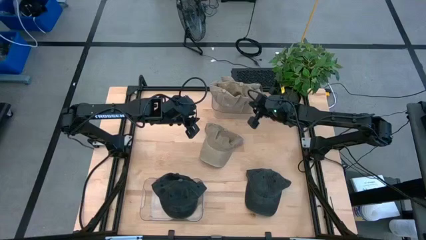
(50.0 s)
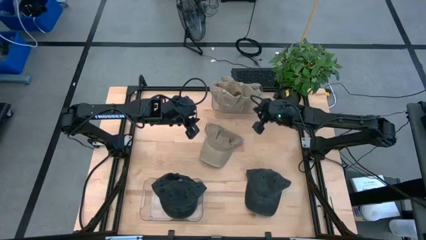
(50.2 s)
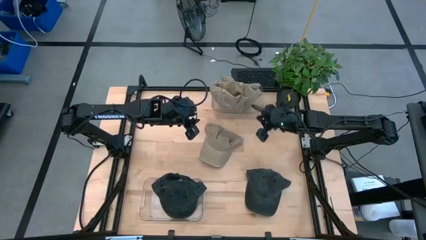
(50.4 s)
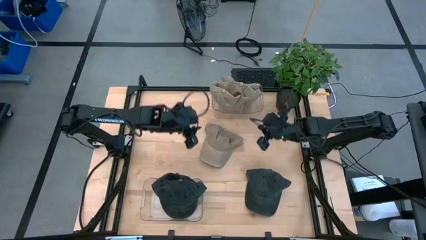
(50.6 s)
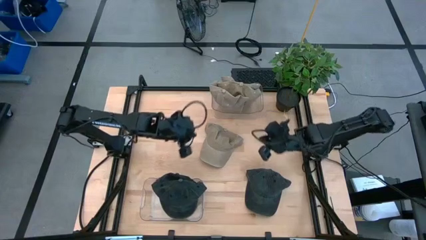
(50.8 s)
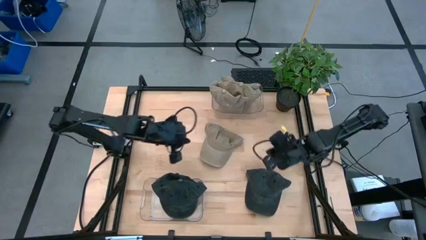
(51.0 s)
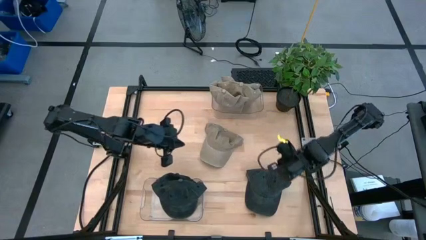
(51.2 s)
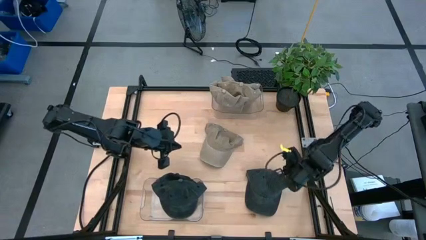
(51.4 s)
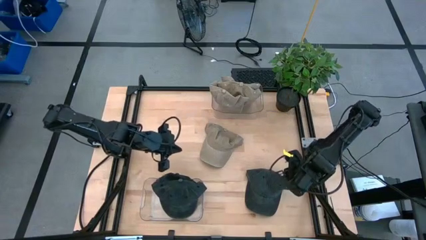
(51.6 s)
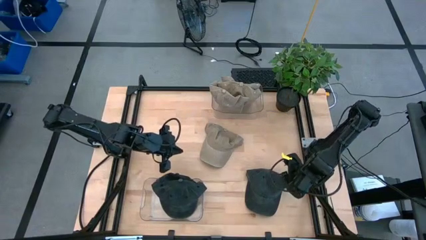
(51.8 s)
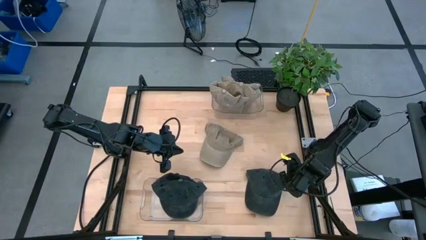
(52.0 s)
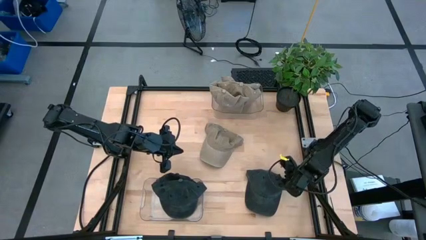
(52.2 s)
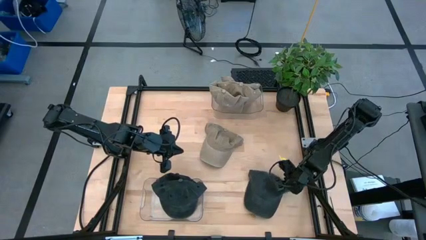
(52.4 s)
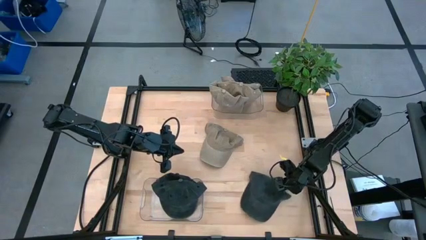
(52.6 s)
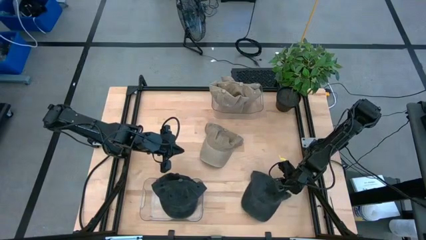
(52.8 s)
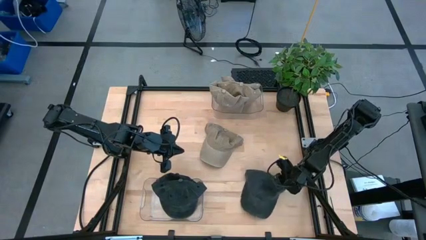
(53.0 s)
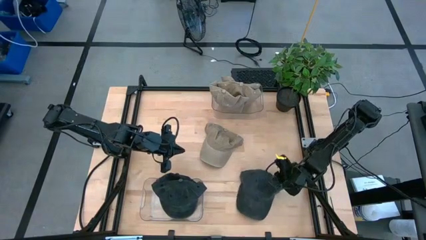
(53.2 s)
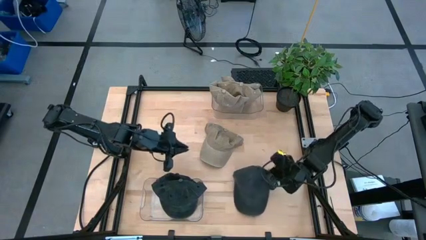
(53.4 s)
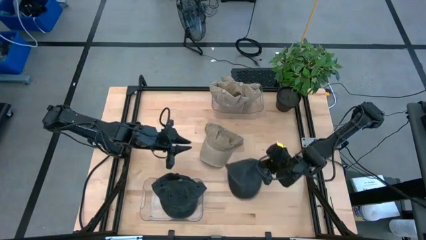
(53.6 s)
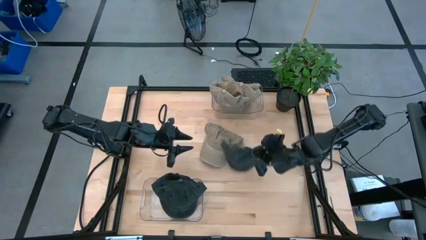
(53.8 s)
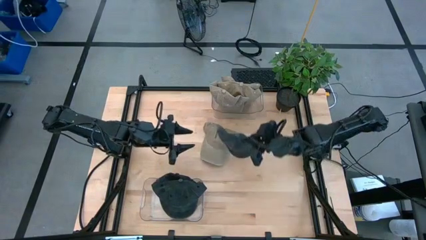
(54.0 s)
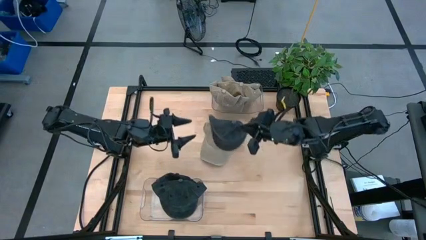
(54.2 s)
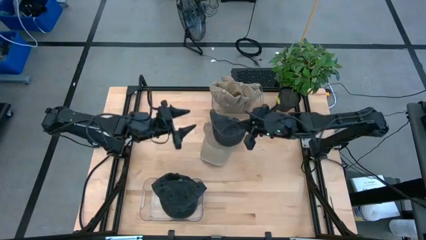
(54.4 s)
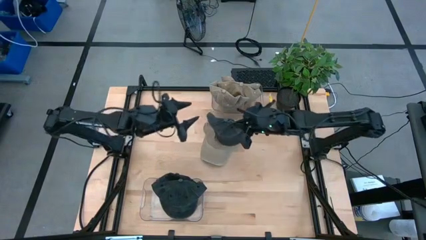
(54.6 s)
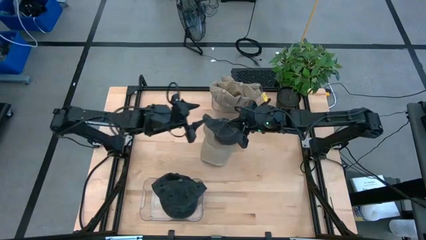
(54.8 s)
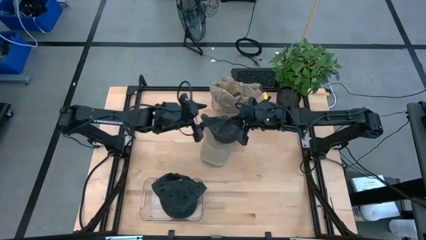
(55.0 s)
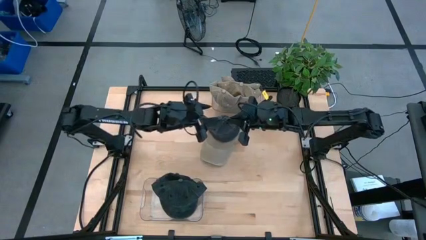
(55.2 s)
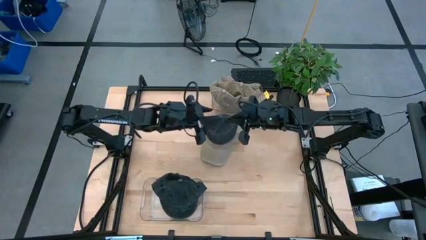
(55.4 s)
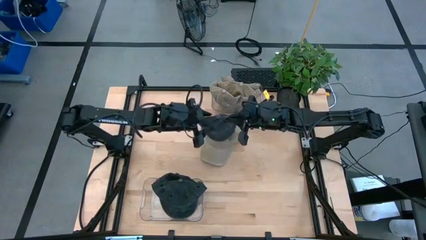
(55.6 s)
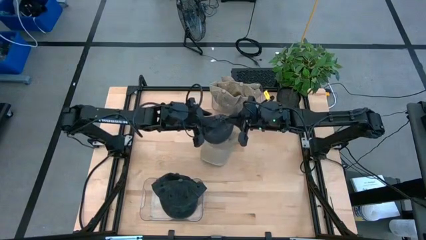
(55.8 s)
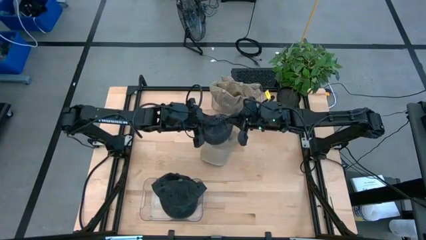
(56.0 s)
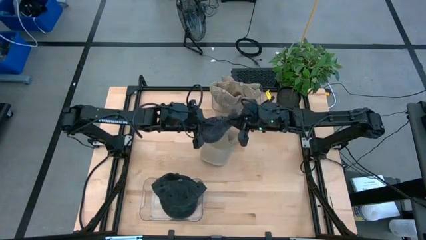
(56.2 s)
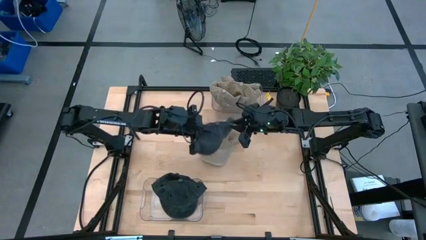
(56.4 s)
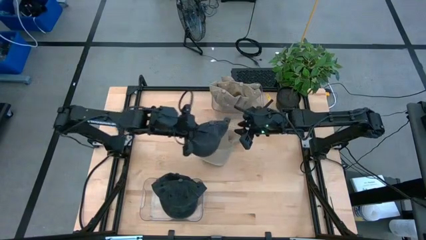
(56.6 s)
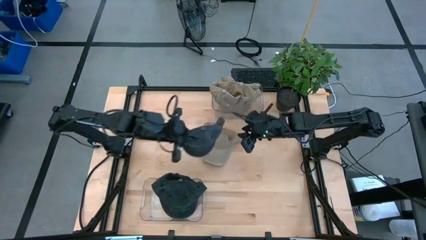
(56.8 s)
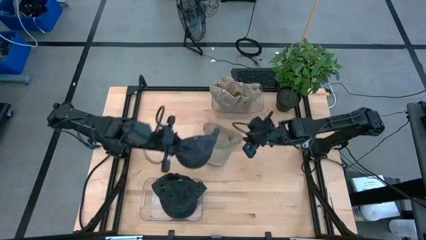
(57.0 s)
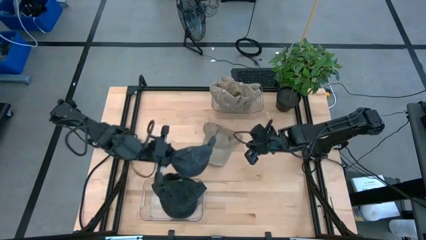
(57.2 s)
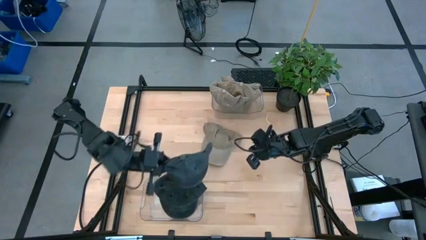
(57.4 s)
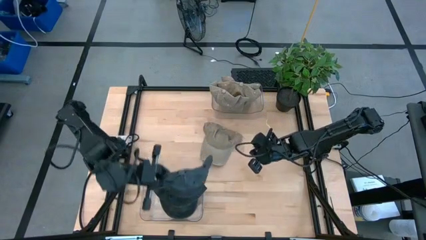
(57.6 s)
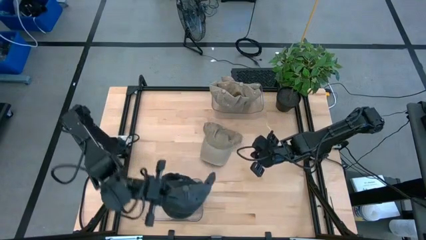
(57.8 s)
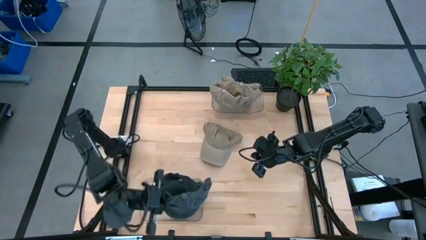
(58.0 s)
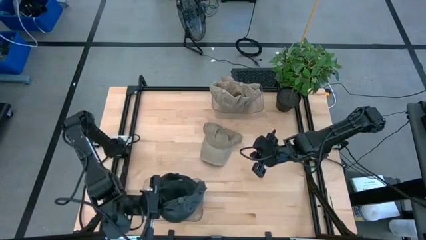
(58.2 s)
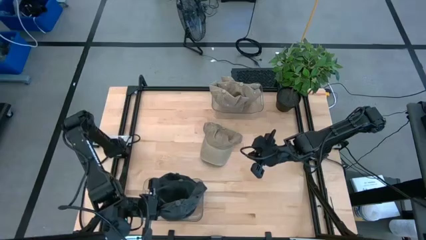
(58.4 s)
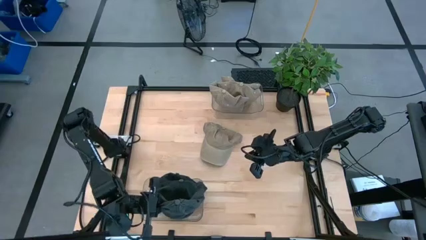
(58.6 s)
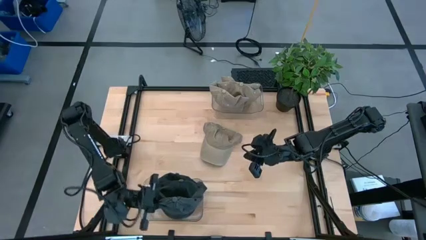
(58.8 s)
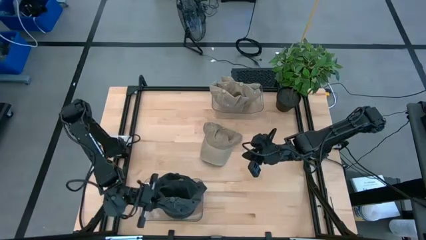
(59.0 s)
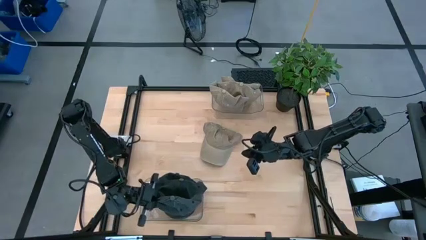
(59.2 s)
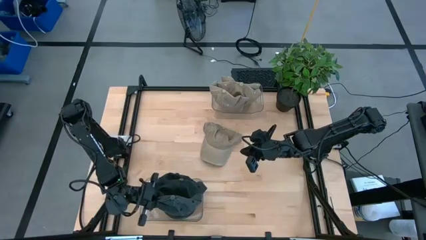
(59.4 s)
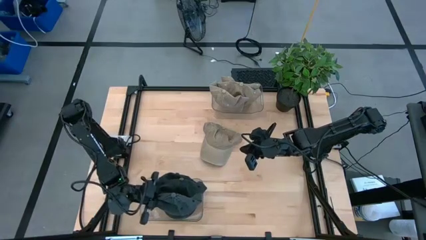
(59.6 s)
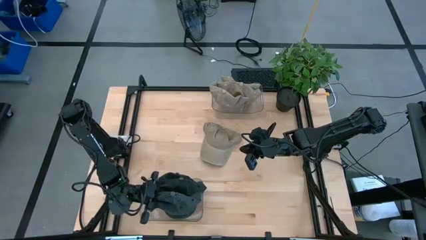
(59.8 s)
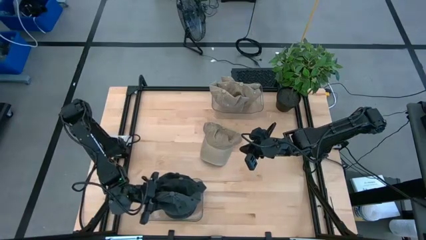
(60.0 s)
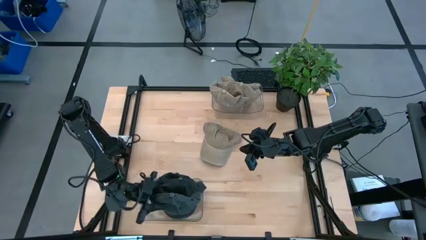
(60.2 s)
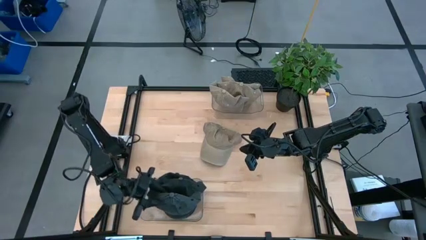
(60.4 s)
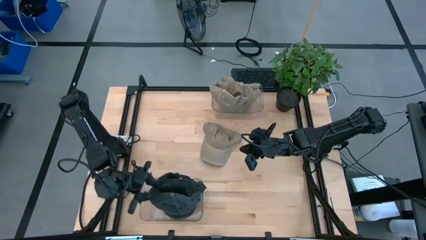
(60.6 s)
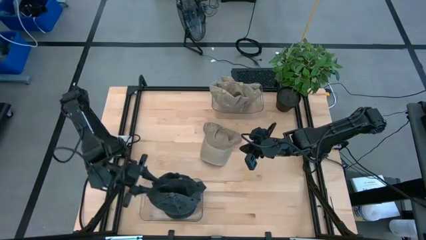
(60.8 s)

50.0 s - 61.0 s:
Task: Pick & Place hat
Put the black cap into the bottom transparent bin

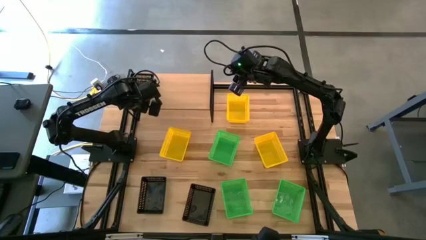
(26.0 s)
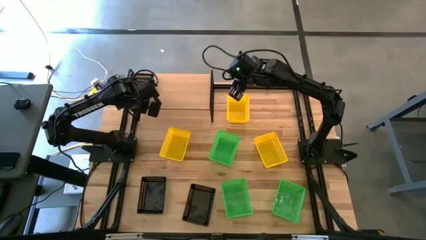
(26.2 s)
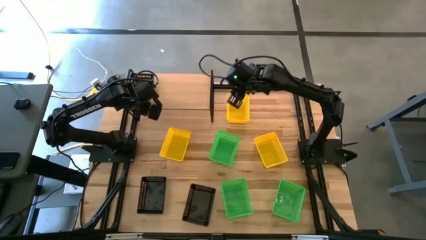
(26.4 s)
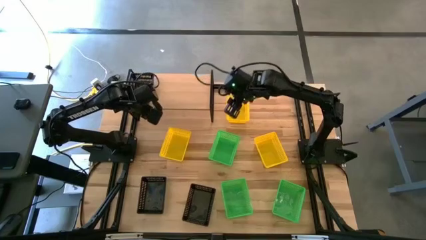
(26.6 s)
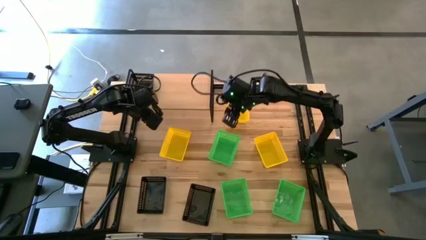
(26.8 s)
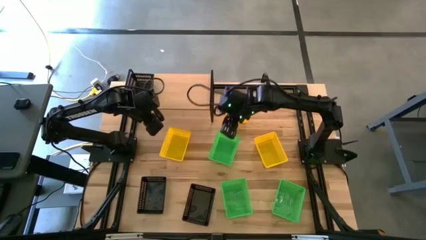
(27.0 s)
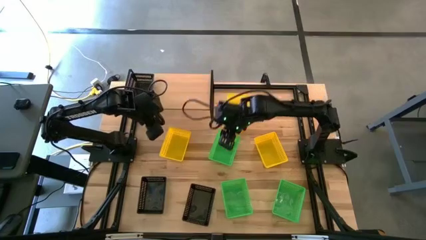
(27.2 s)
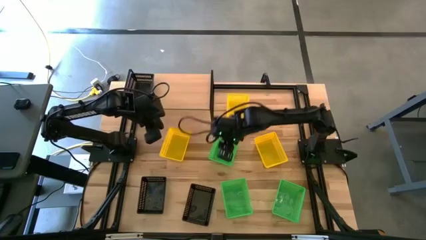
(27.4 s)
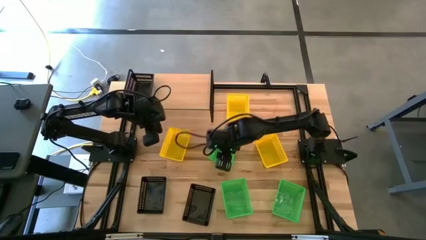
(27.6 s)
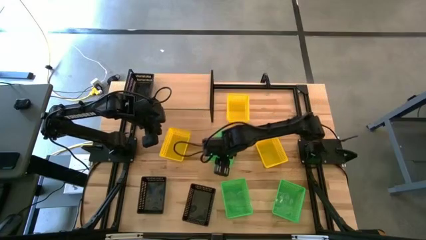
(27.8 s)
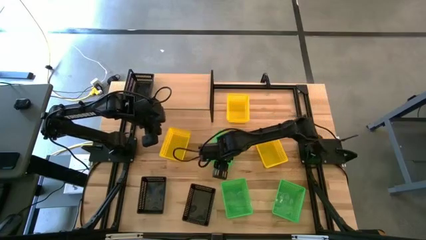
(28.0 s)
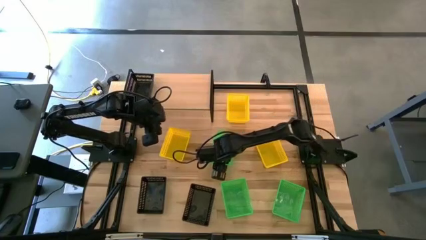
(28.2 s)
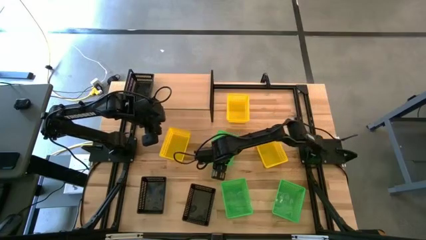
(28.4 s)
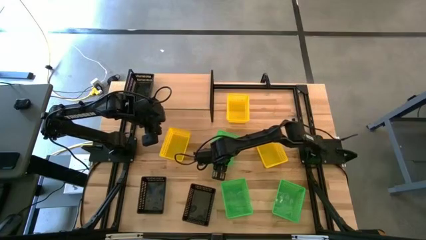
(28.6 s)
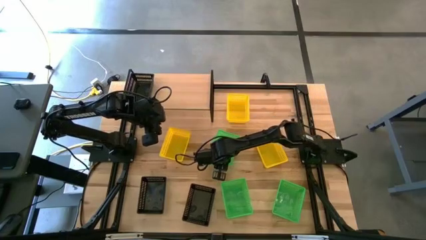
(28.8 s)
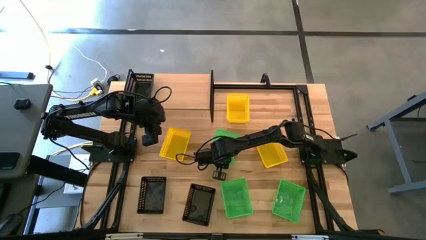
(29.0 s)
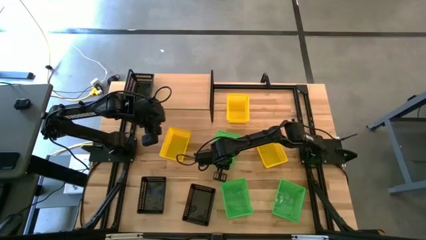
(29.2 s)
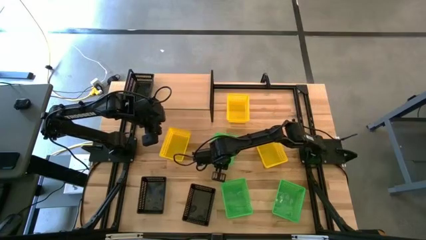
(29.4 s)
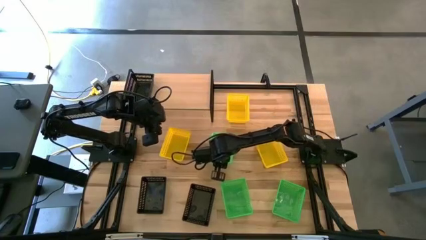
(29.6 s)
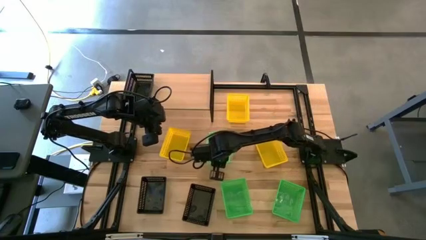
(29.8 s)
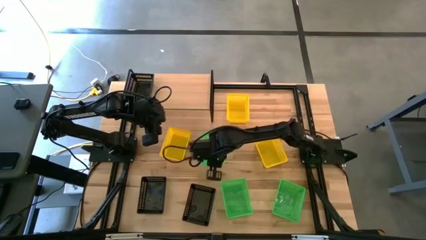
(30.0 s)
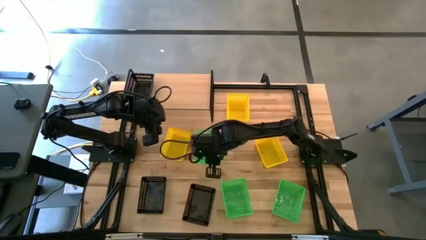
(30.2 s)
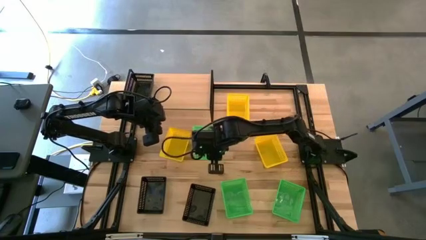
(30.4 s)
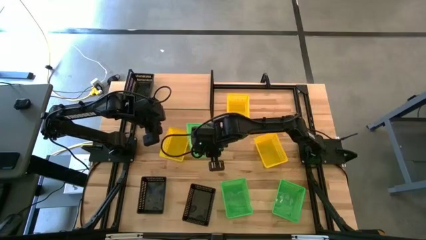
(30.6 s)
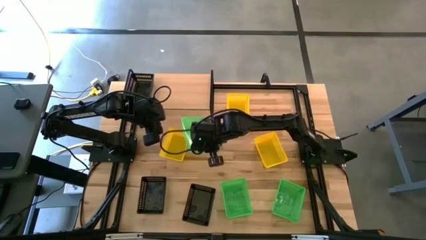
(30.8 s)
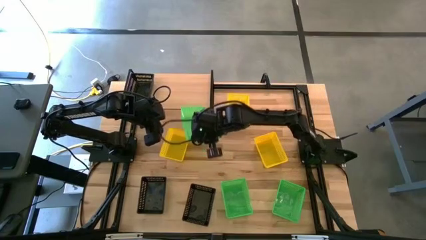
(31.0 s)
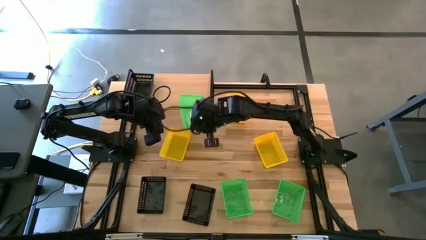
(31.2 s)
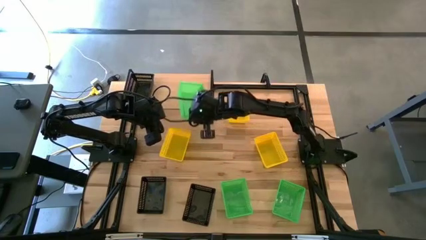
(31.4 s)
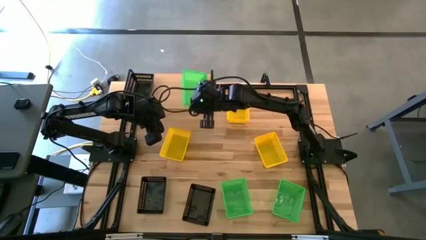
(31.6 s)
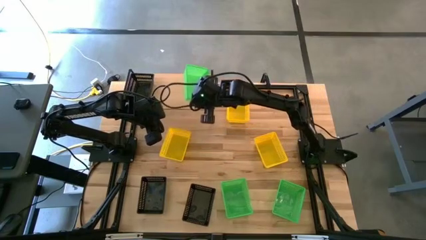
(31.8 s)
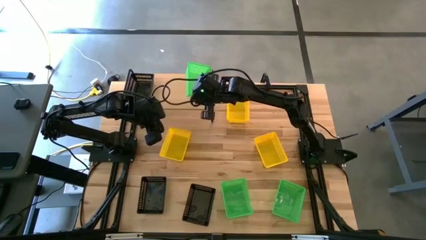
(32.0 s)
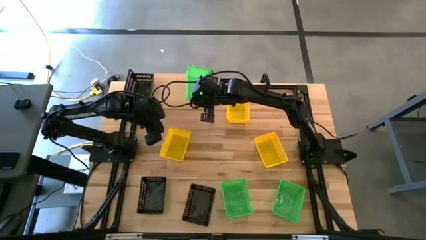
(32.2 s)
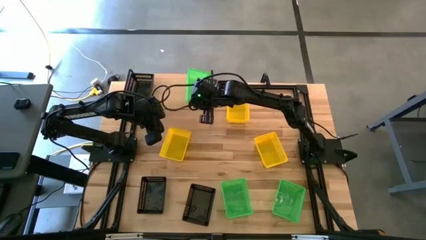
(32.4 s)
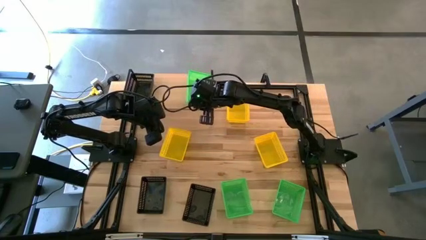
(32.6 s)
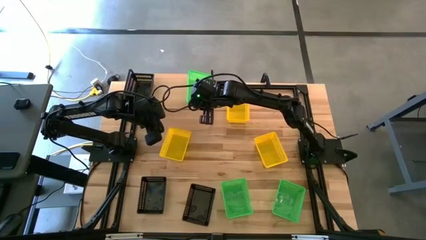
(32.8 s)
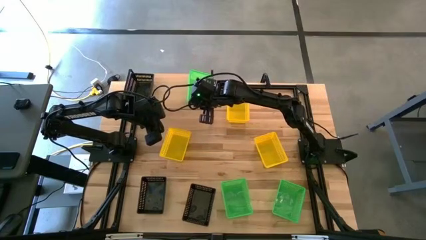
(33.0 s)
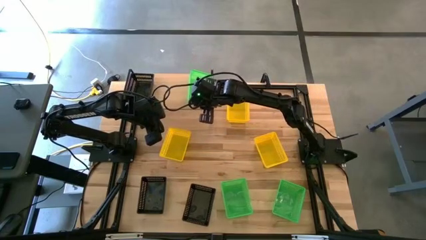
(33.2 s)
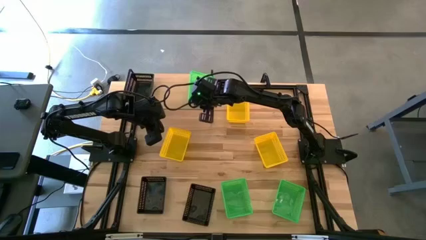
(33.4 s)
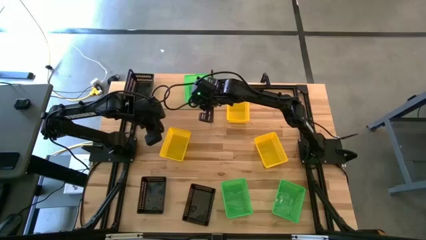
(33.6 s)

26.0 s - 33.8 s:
Task: Stack baskets on shelf by color
Put the top left green bin on the shelf
